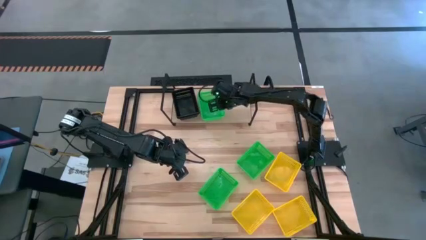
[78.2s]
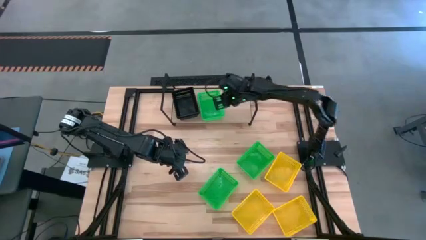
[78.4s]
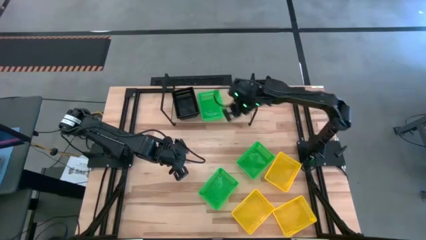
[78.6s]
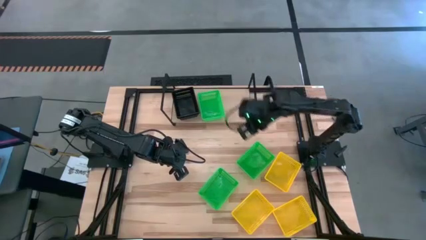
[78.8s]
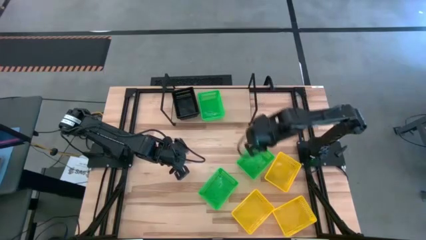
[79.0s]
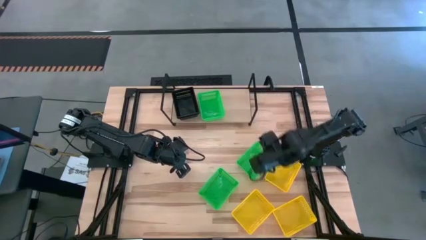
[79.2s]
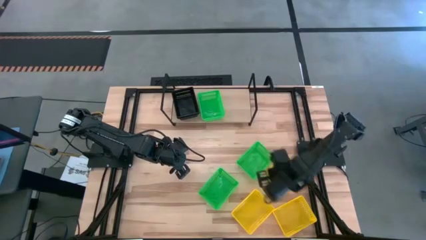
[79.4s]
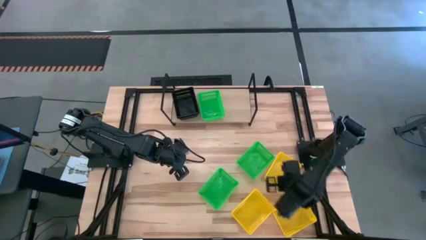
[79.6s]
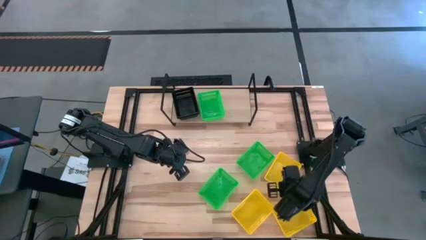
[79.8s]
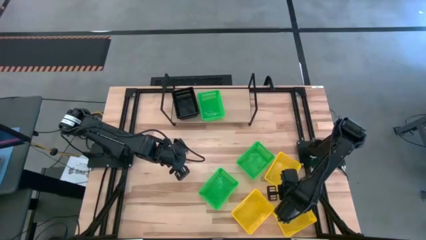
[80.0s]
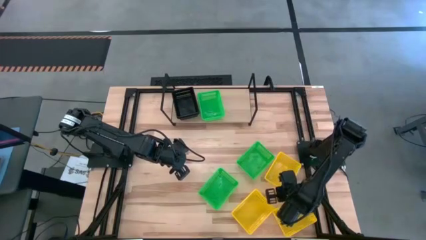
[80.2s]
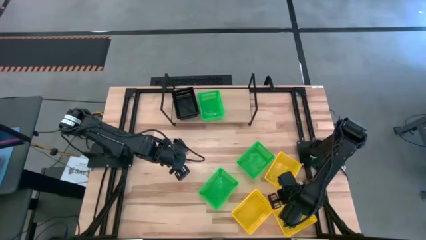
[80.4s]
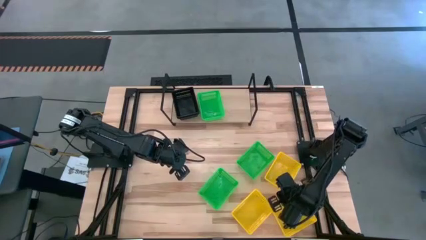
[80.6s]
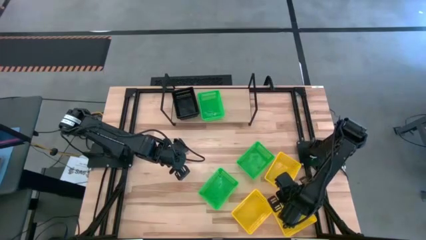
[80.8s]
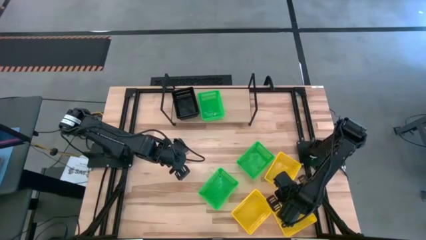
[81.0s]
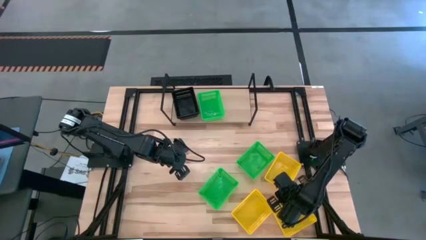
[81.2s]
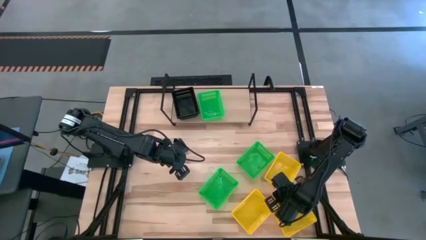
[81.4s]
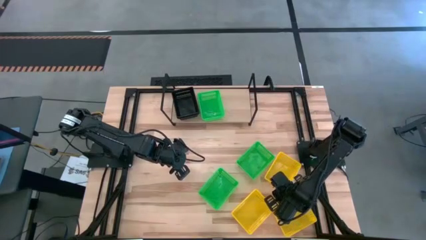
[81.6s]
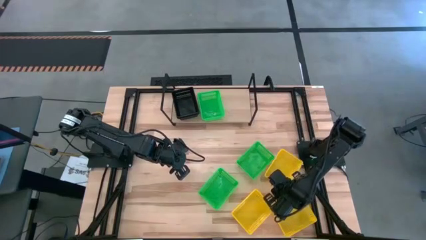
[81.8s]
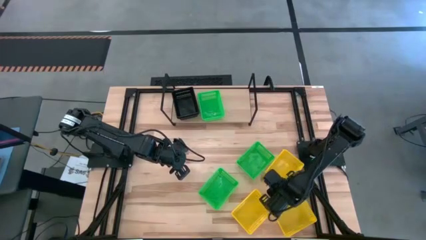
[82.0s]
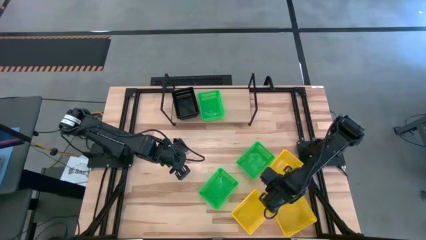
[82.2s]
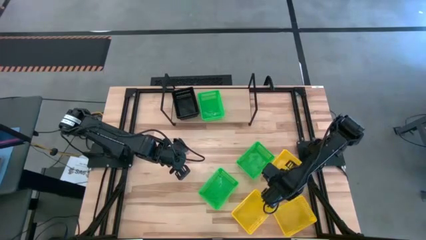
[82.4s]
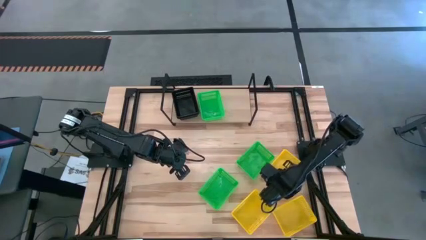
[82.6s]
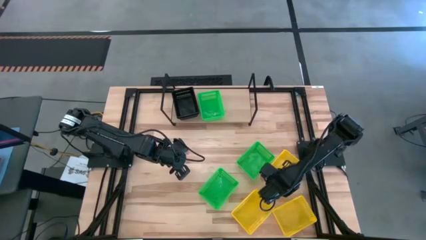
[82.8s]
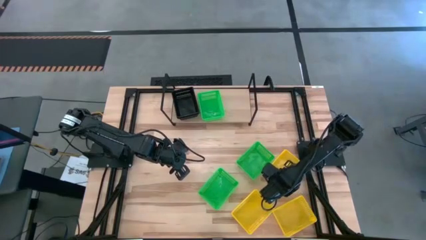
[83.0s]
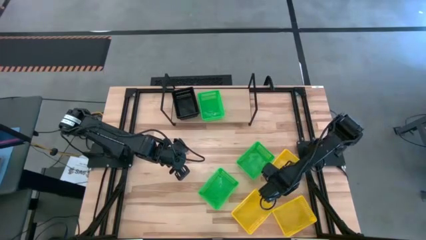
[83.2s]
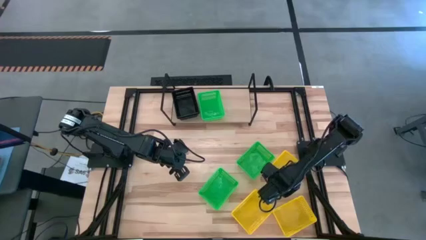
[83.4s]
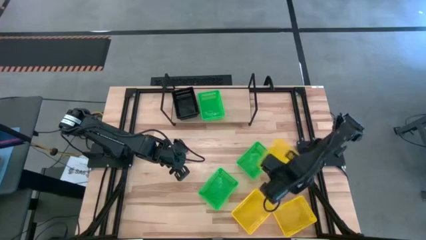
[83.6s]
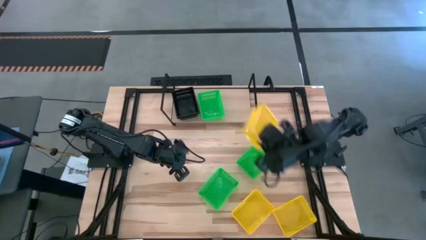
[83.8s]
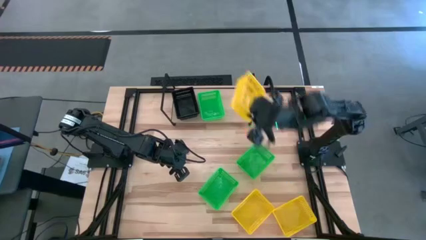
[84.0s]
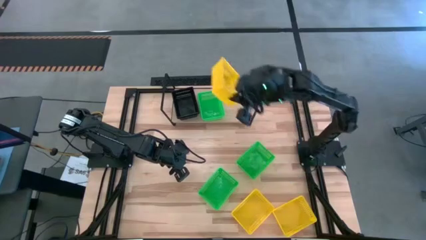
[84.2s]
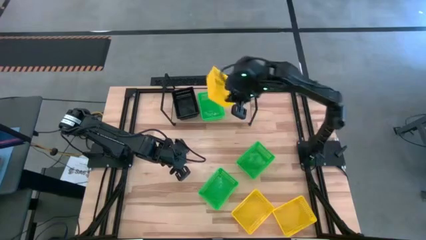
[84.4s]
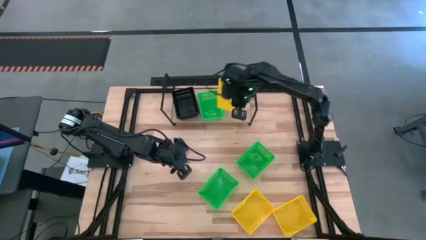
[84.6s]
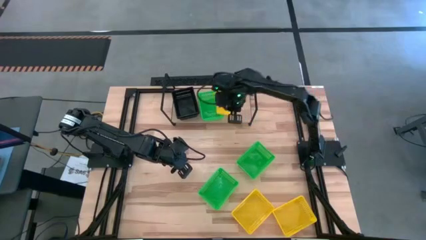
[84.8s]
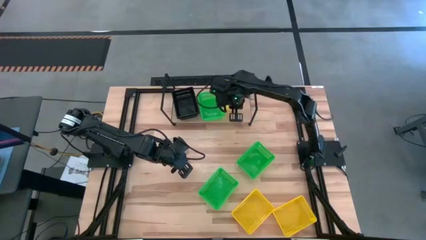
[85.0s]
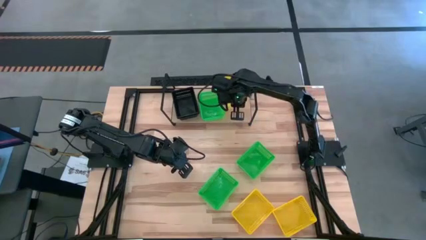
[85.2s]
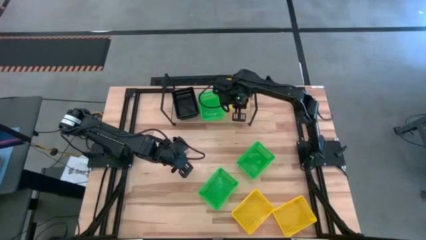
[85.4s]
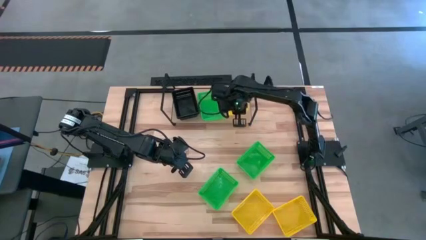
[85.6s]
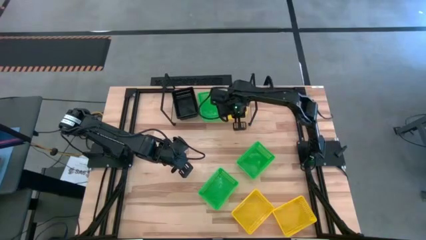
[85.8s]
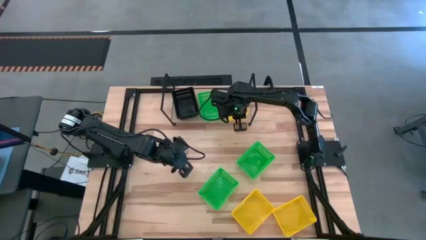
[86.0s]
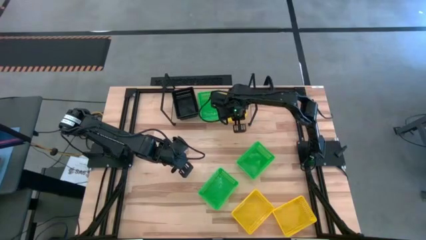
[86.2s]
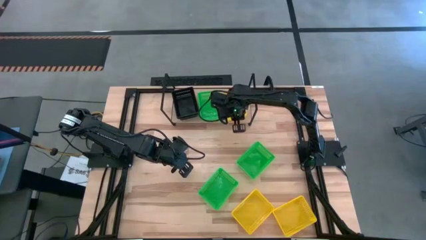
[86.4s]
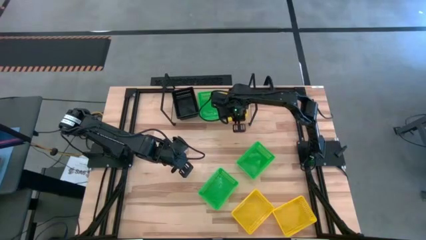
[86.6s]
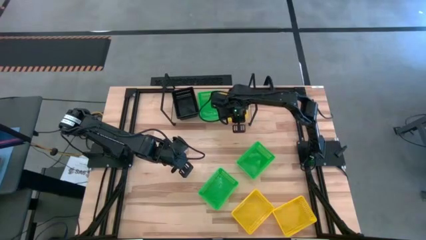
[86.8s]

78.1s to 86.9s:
Task: Stack baskets on shelf by color
Put the top yellow bin on the shelf
